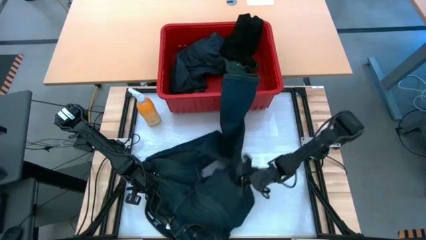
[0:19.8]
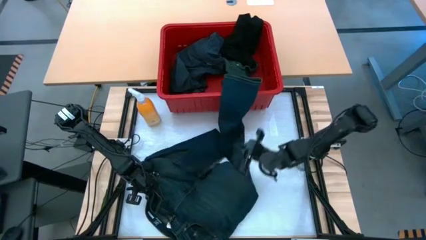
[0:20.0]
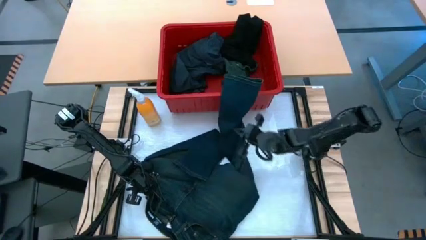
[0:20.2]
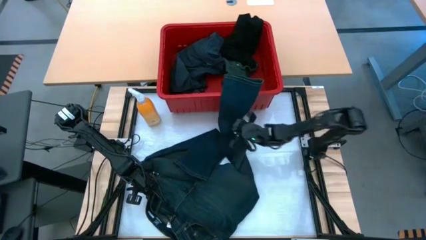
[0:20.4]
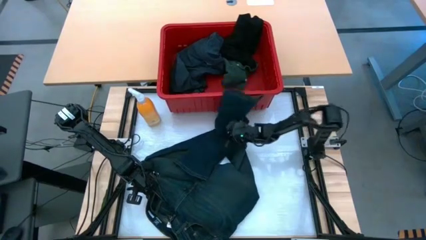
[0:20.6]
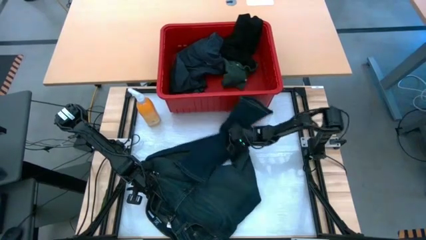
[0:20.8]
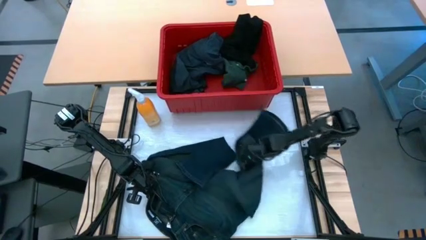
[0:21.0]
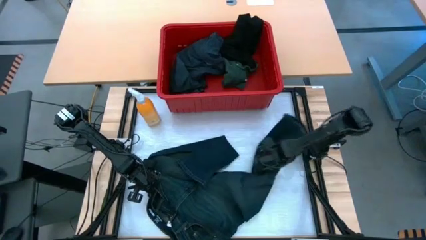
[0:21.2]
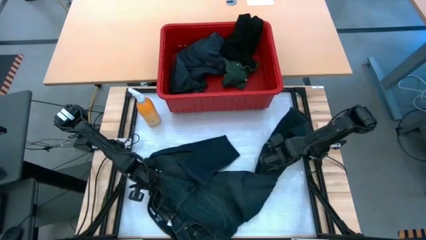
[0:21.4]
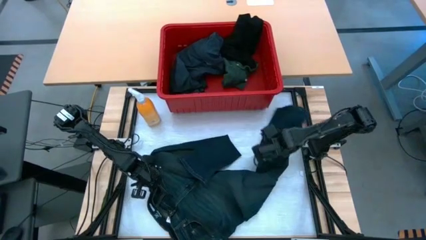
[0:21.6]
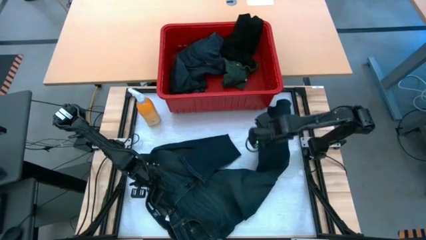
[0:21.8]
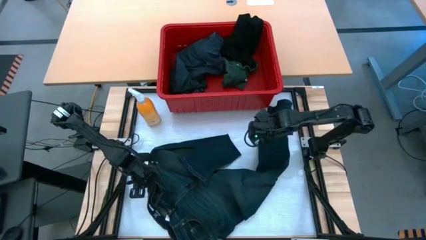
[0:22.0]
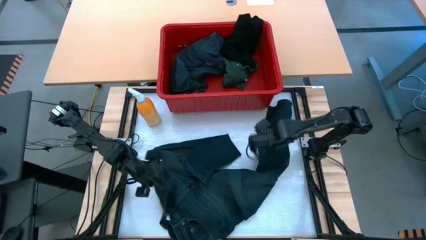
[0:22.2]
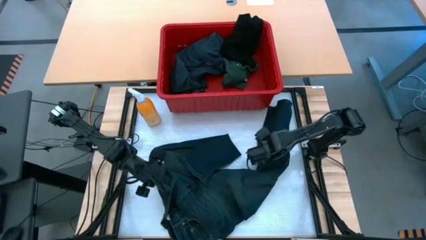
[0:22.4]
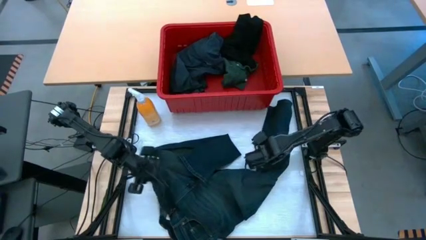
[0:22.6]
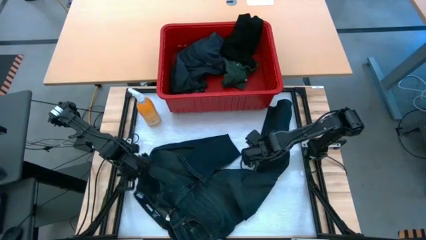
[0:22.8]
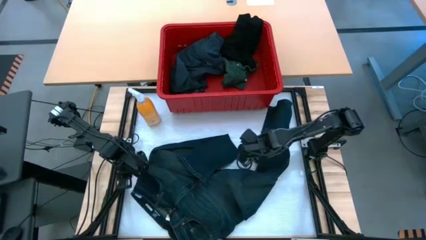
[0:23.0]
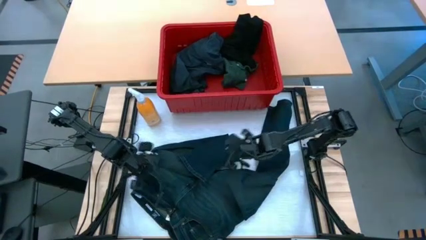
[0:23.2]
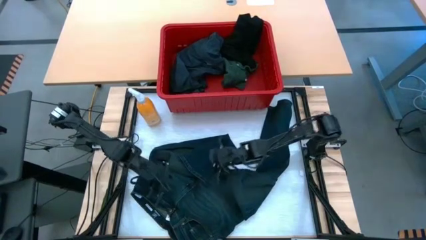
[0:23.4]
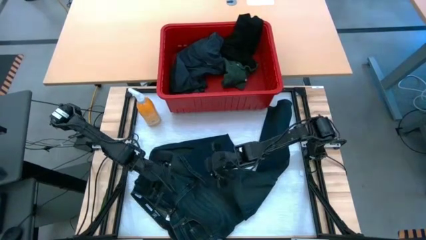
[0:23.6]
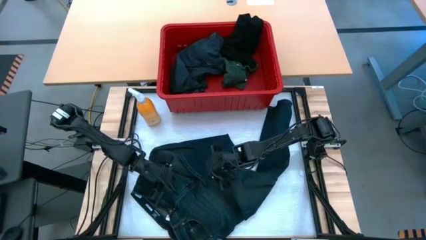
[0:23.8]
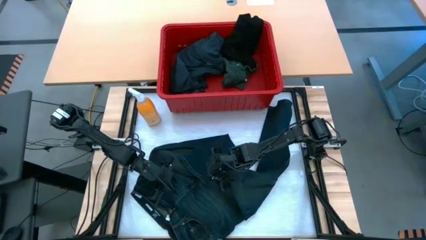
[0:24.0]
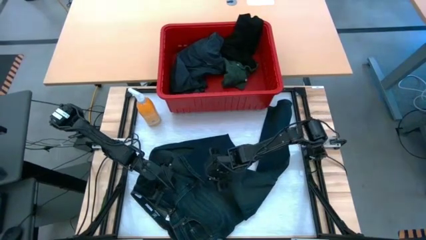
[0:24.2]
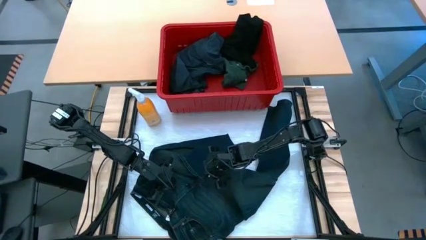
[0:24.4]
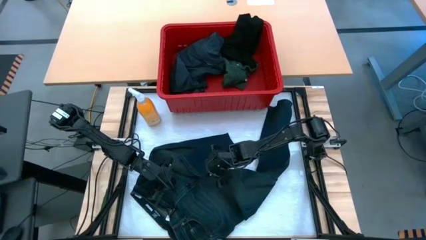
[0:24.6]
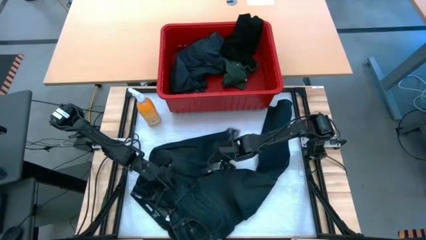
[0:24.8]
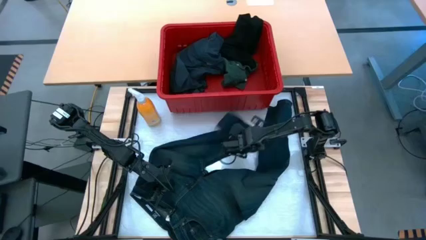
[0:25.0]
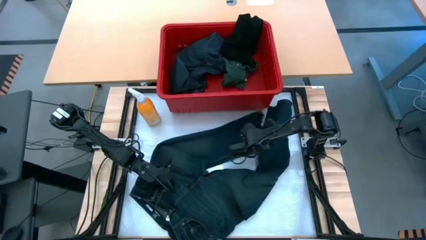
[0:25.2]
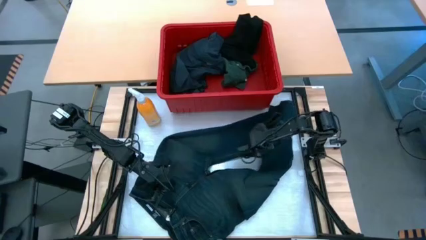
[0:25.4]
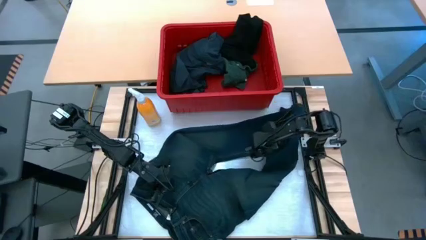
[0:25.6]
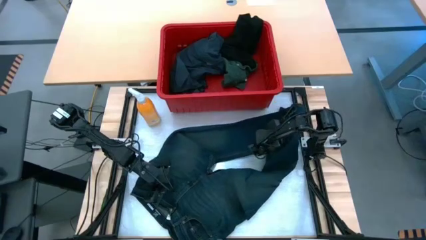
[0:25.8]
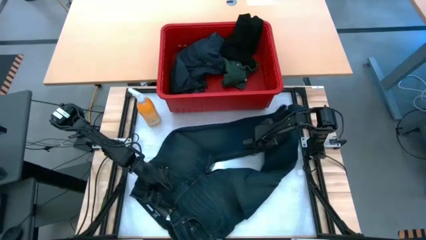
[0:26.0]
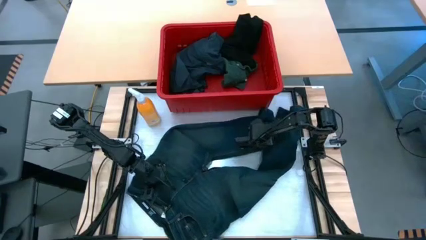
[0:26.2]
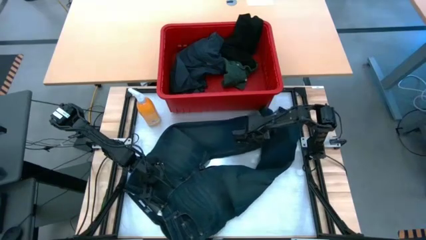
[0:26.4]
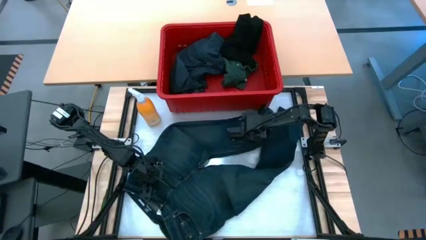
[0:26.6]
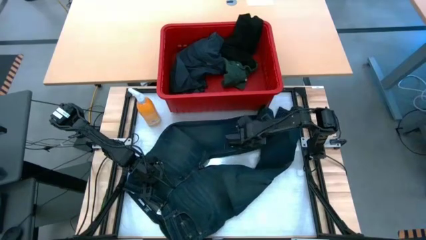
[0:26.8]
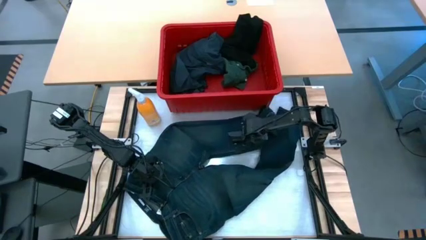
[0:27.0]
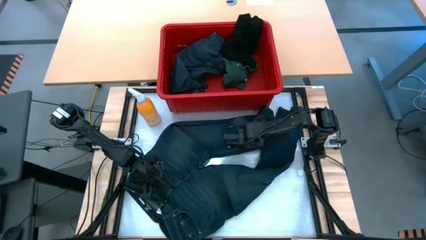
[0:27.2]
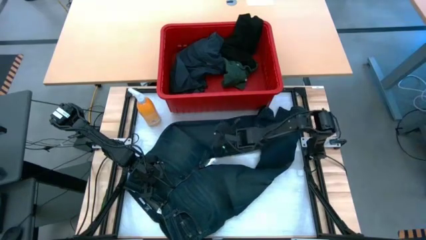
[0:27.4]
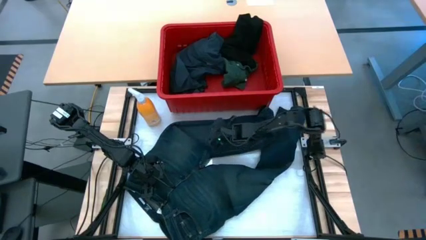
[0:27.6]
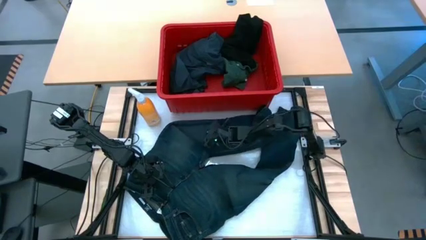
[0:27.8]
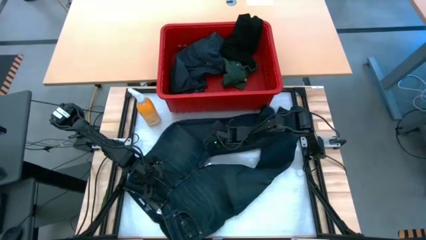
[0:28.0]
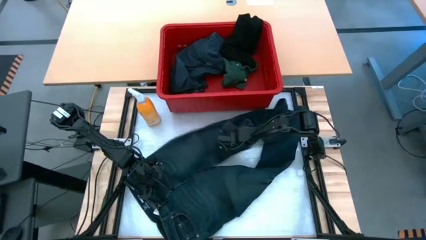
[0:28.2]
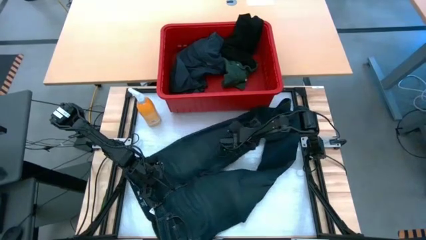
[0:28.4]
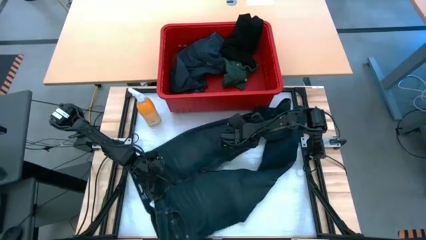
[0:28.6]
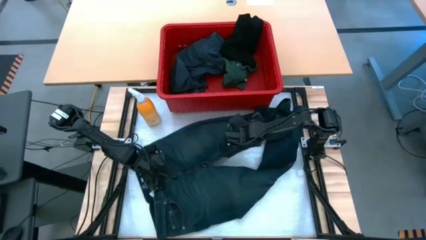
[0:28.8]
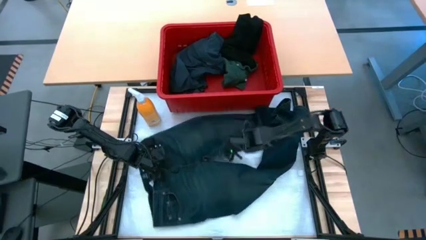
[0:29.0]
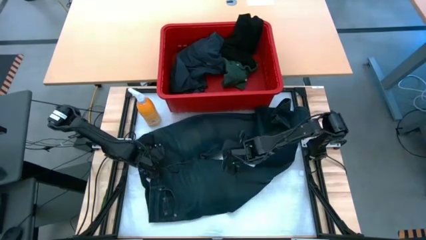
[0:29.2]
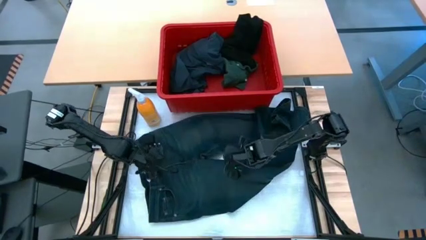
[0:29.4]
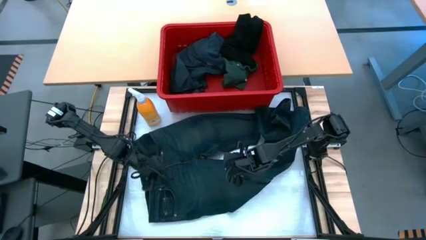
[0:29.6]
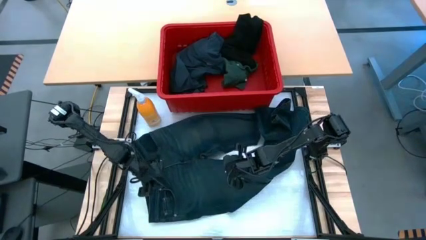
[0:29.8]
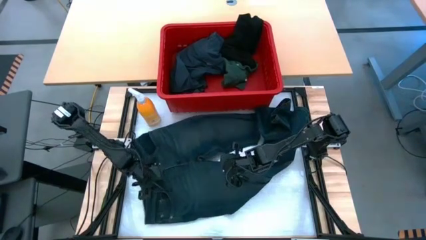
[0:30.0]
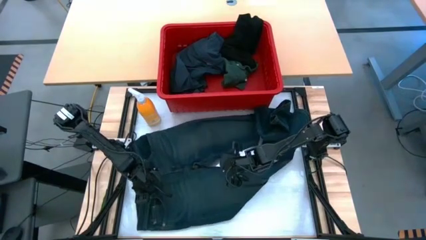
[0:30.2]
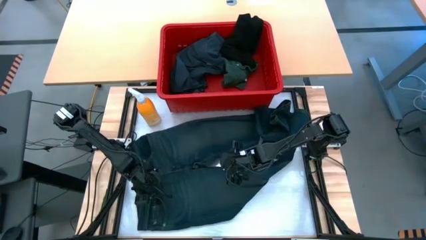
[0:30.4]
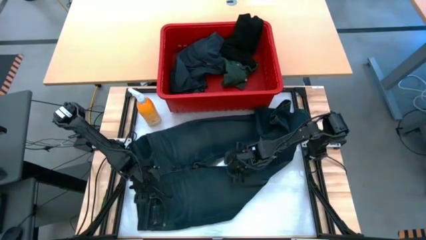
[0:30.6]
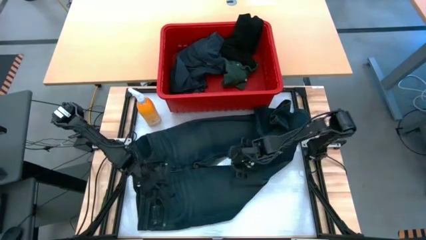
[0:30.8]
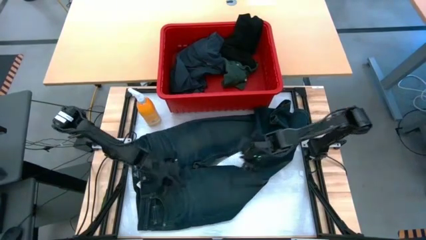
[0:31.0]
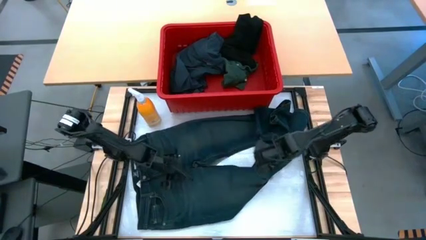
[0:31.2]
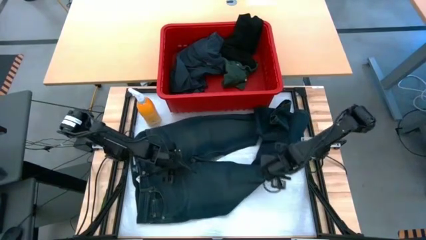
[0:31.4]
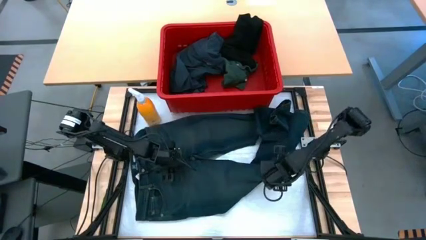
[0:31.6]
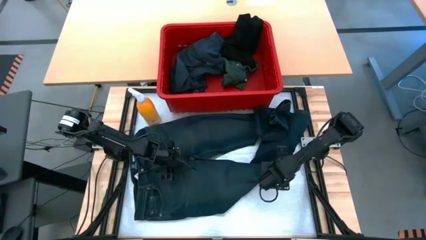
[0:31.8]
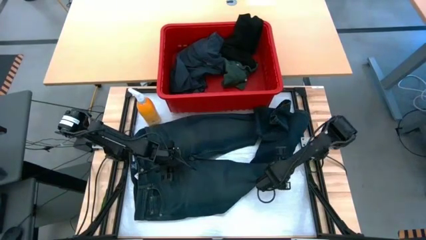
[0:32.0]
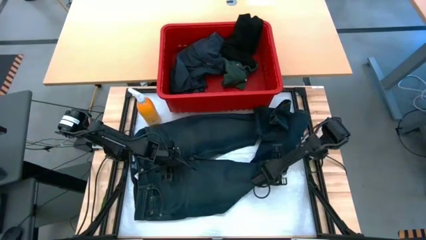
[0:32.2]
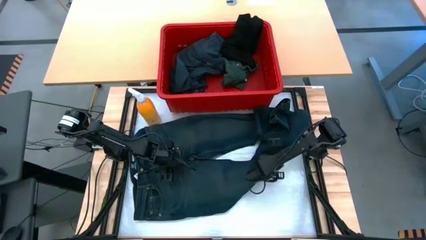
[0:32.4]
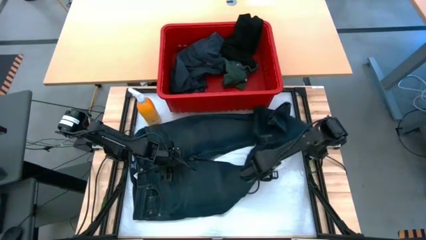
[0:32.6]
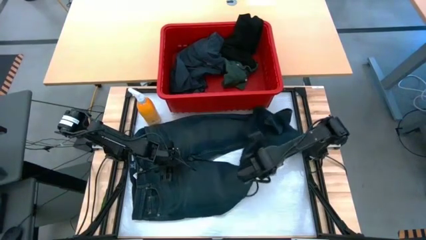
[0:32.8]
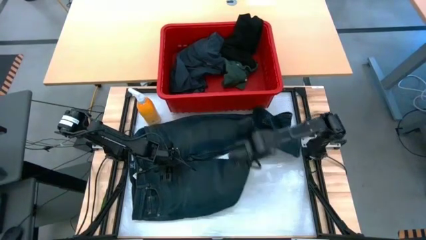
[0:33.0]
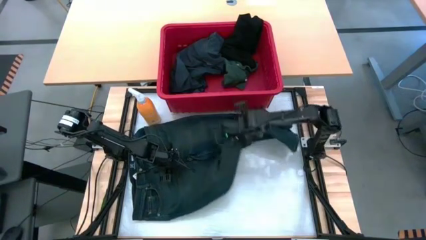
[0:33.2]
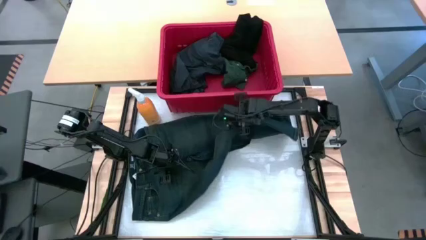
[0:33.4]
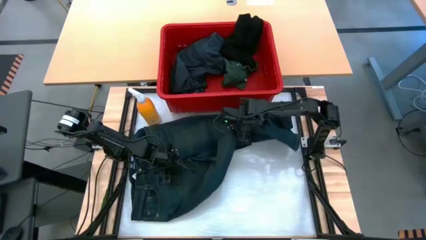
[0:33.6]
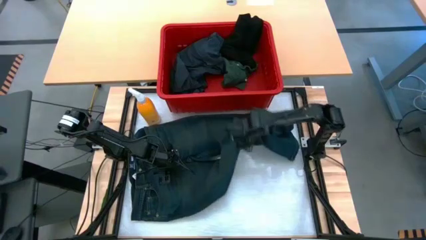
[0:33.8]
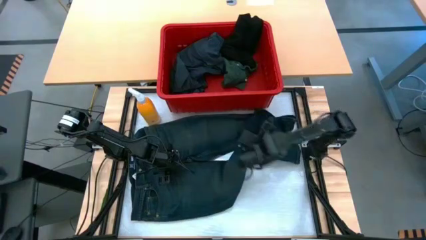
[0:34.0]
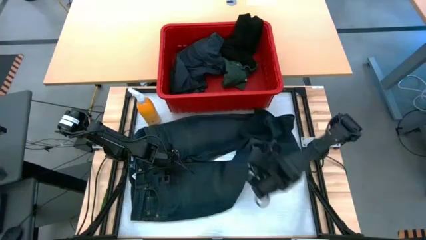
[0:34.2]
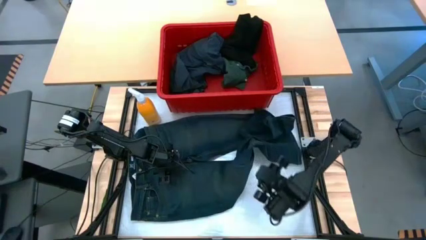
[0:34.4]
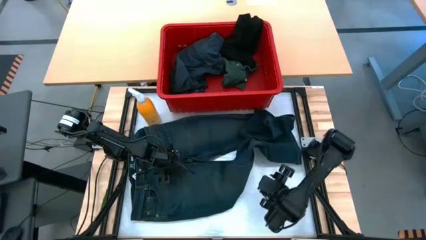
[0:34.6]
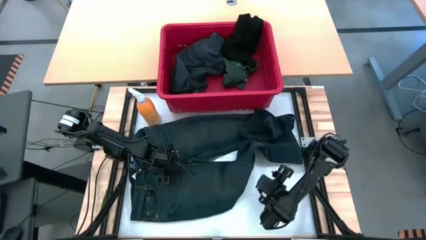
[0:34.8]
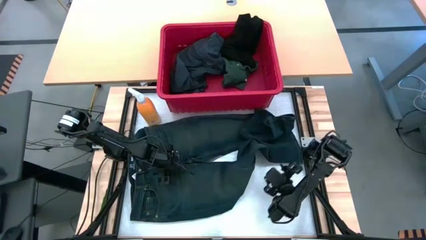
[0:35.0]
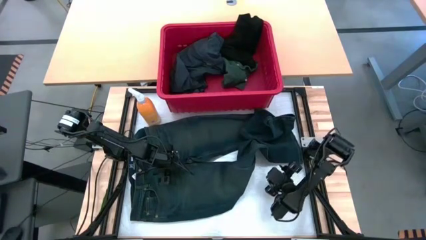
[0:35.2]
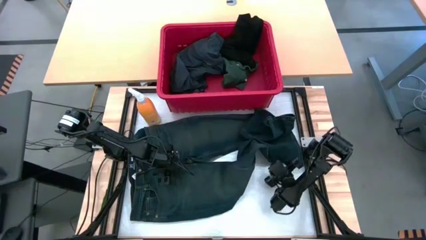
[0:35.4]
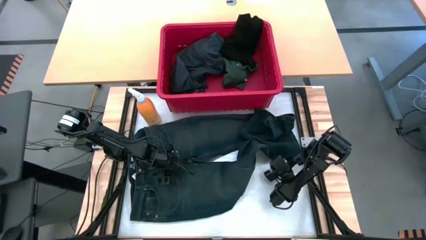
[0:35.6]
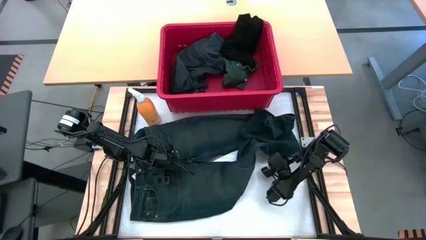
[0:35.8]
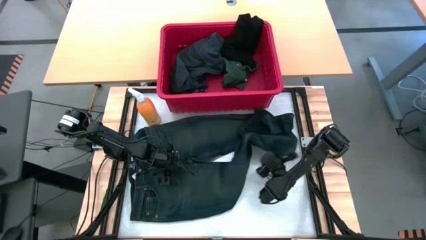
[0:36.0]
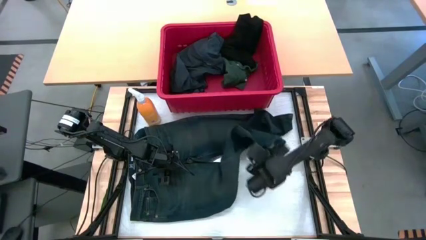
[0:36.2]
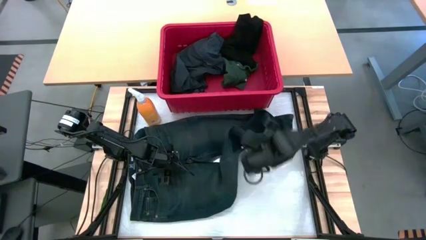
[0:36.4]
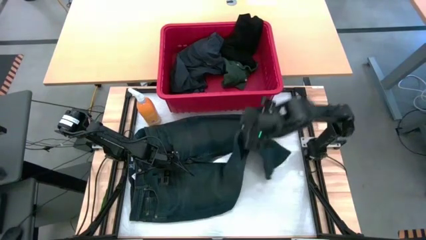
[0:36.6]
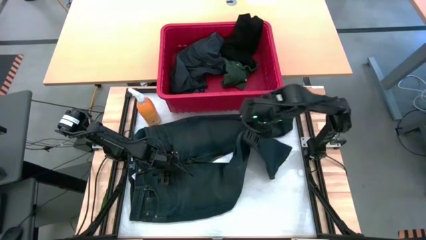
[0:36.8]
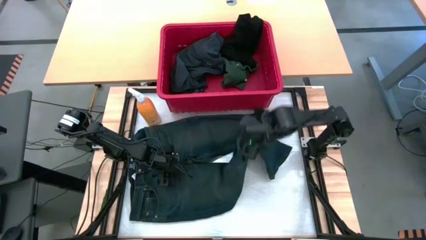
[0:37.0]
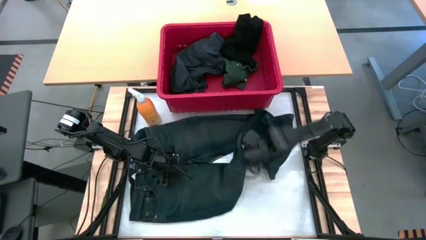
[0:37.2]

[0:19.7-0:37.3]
Task: Fold Laundry from Bin
Fold the dark blue jeans
